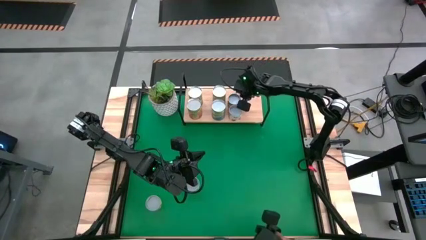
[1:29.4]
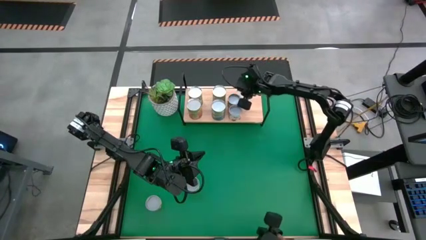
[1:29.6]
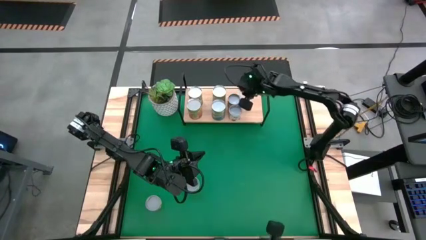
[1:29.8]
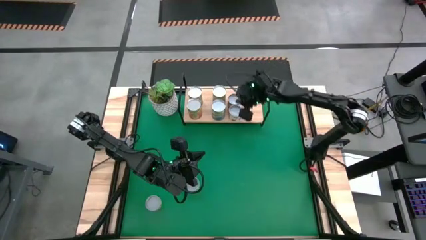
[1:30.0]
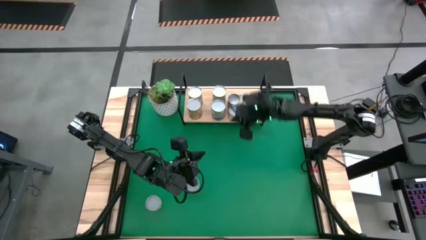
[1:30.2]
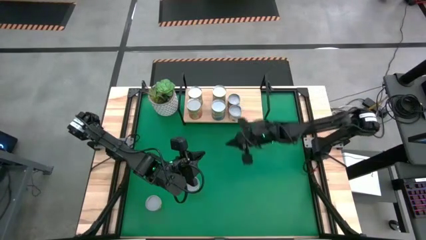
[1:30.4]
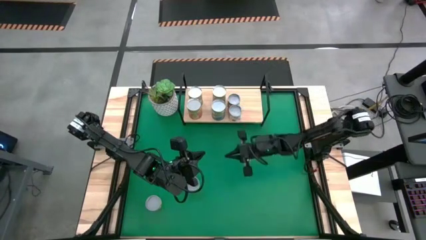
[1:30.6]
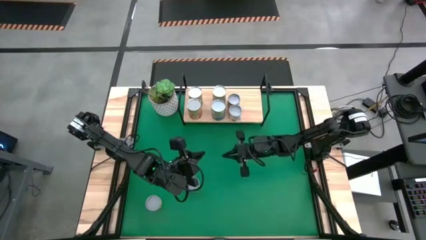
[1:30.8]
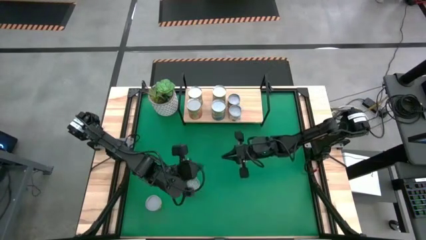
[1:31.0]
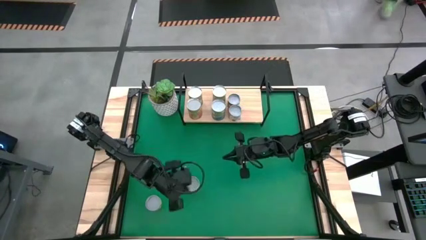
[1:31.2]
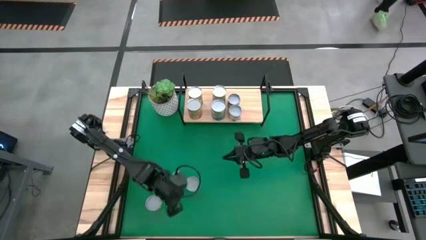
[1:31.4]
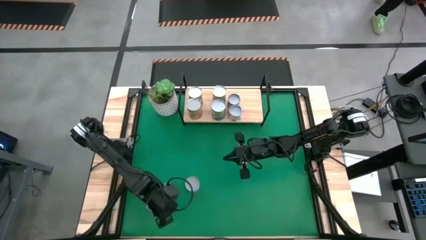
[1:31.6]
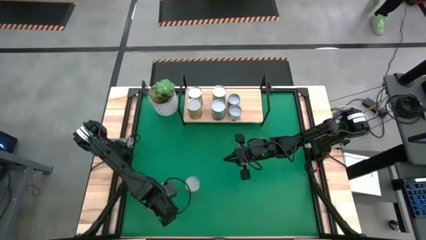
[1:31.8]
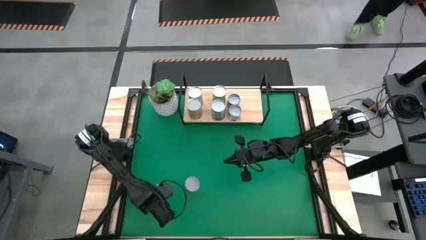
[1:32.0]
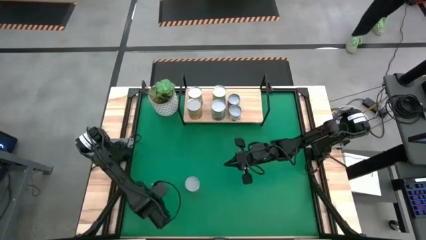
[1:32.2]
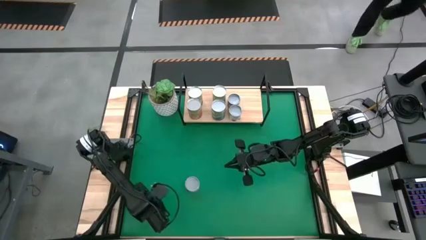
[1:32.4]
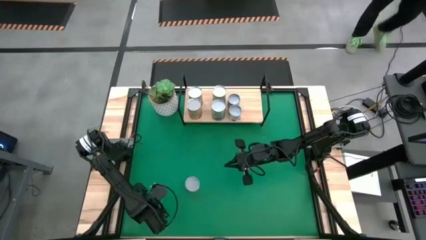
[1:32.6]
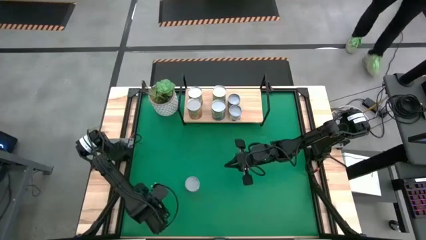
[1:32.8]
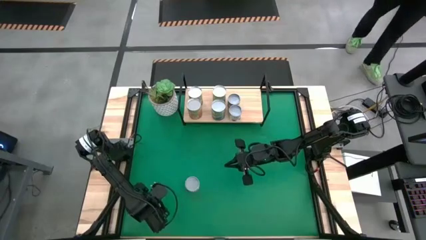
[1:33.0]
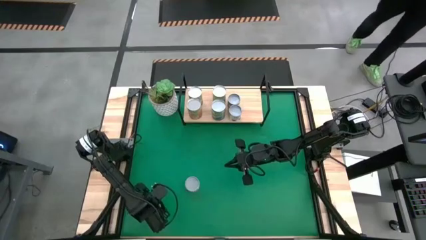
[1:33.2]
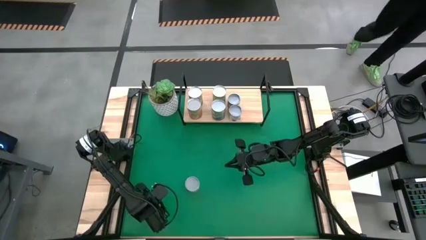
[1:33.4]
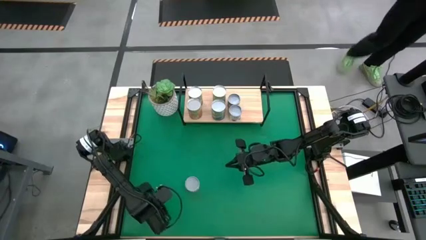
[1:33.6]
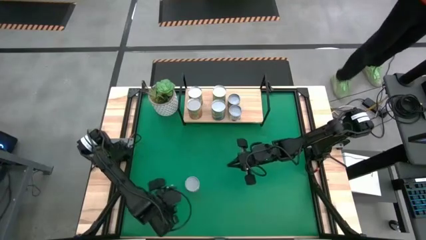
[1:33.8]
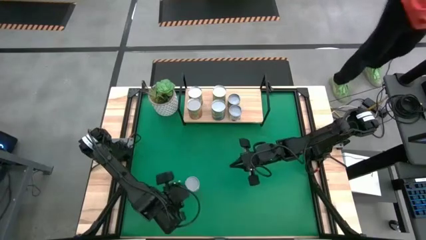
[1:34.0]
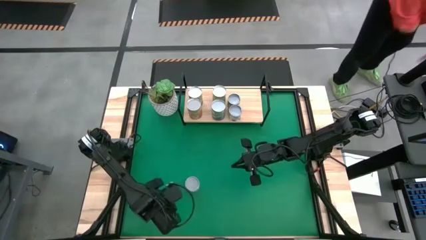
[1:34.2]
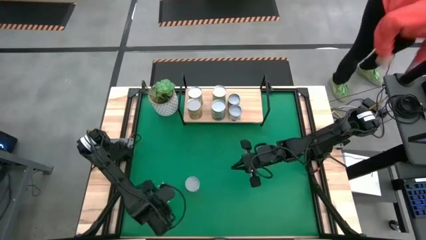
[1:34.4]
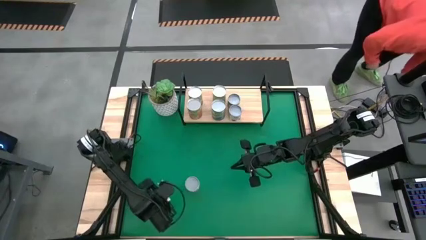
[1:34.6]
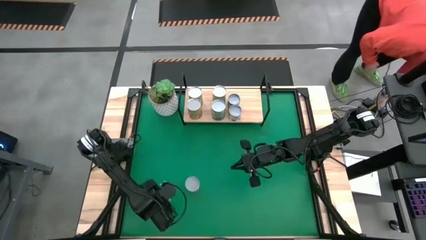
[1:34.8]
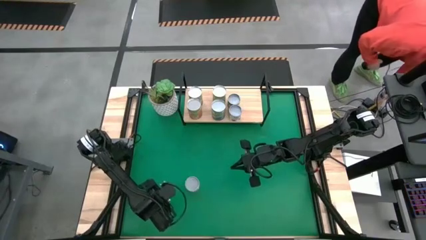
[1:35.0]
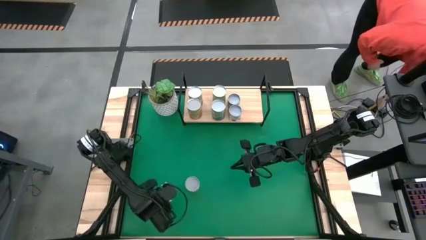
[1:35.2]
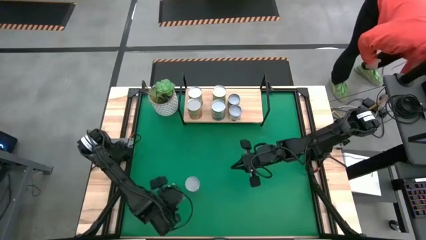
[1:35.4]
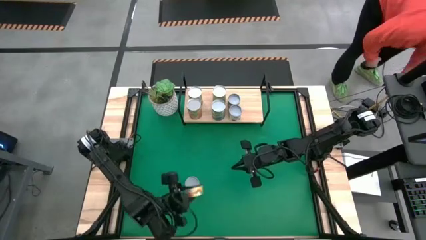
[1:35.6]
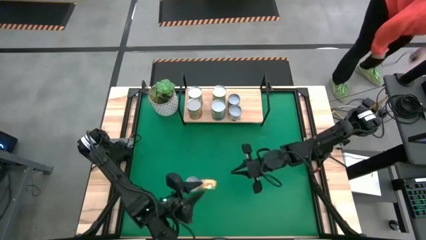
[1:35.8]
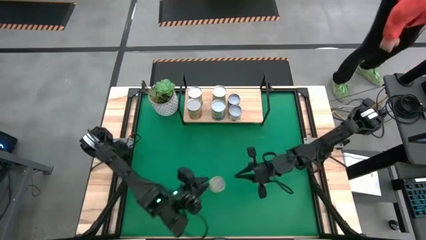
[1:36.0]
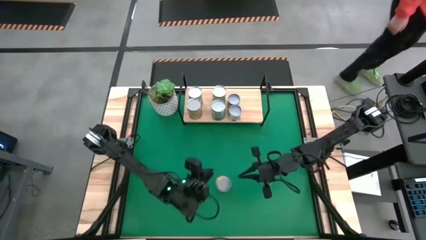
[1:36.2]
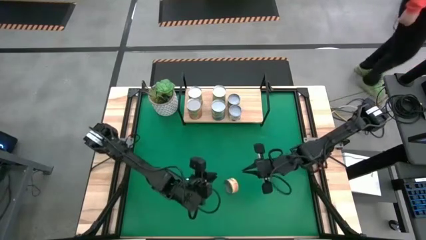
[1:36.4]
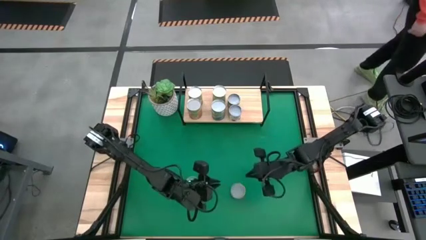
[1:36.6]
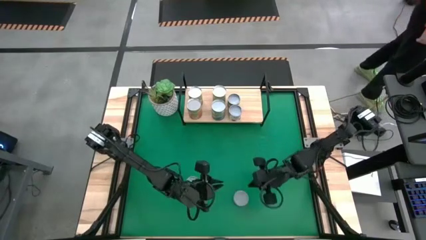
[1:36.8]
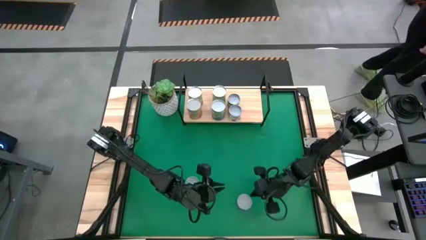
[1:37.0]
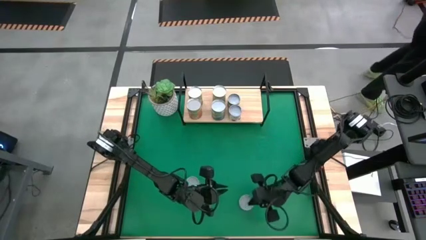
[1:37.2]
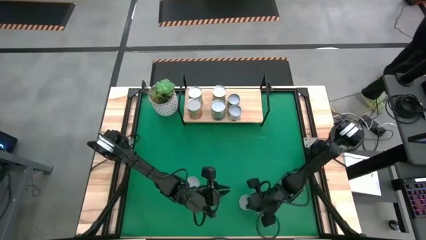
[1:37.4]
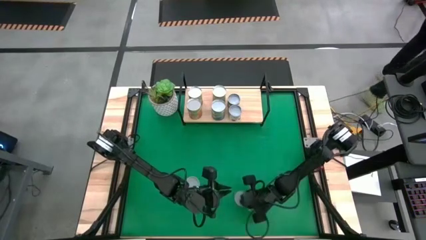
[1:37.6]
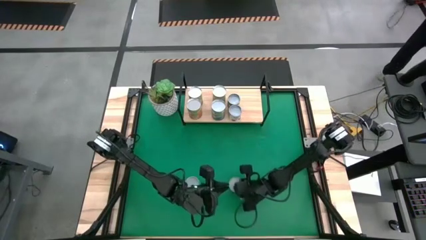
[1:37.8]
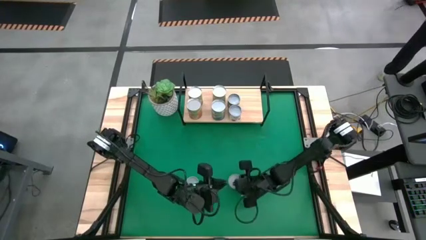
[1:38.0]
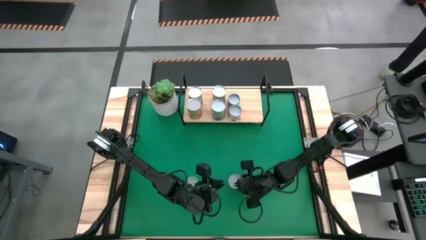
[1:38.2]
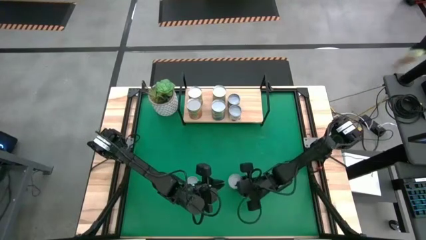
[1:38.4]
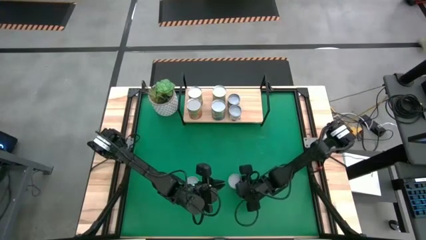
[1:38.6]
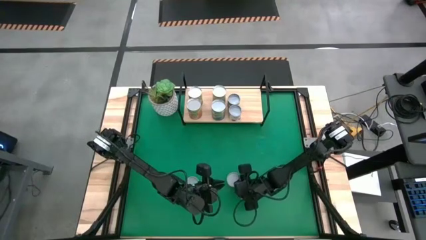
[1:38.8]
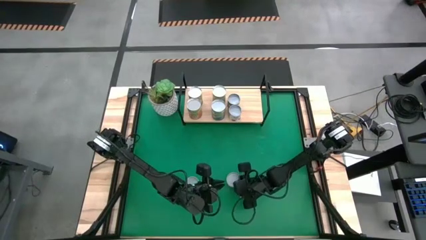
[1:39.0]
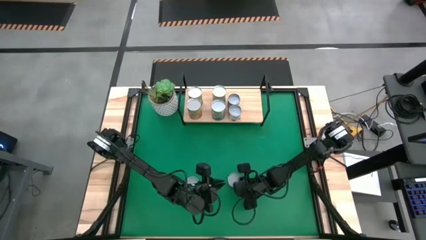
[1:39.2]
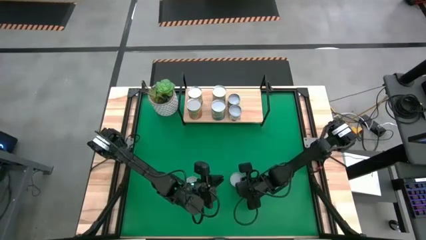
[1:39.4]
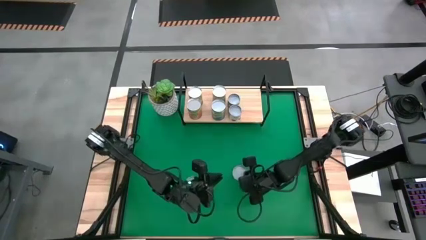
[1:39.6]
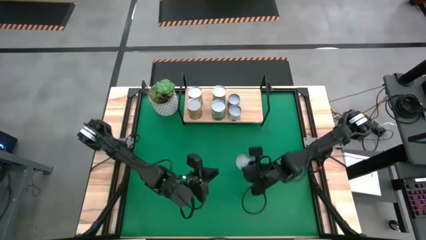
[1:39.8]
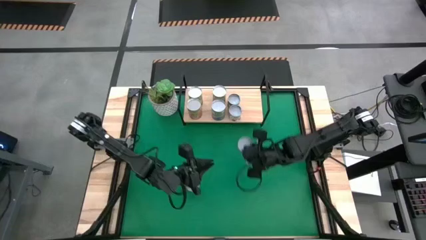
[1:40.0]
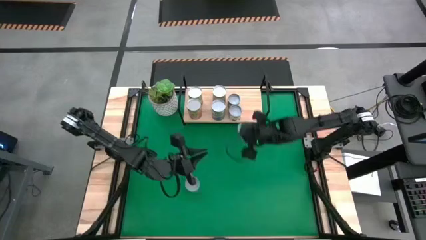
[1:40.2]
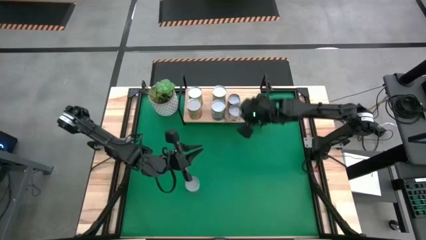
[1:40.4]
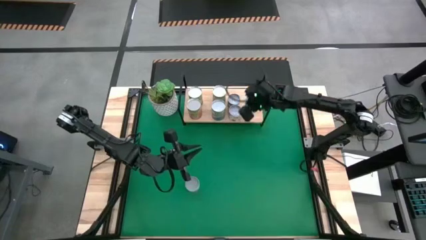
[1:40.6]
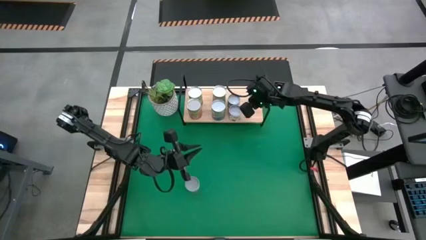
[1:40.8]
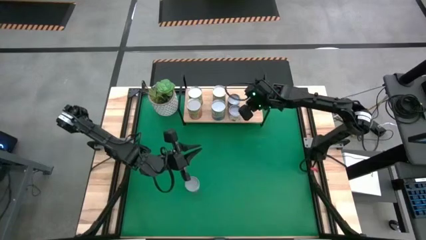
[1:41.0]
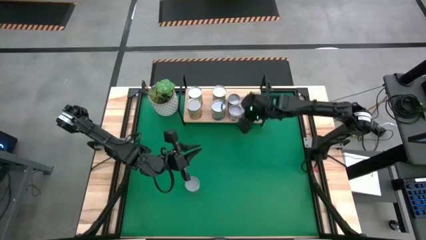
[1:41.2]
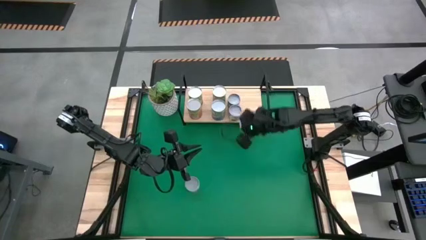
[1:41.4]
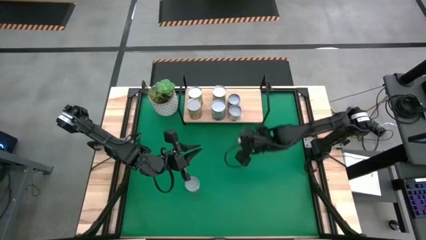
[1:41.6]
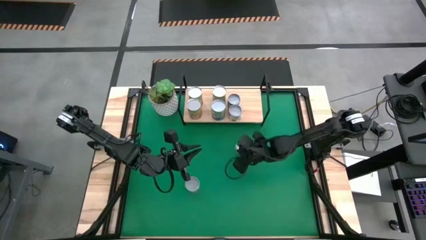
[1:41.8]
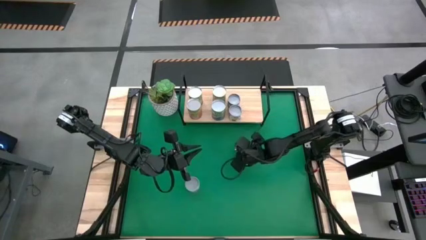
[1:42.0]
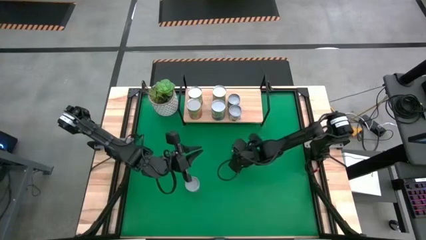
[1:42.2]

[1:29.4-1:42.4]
Task: Pick and place cans onto a shelf
Put the canned mushrooms on the shelf

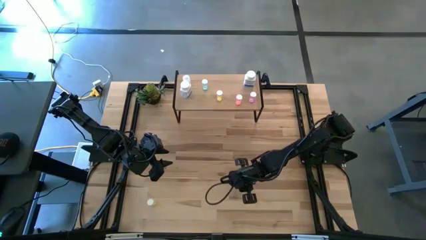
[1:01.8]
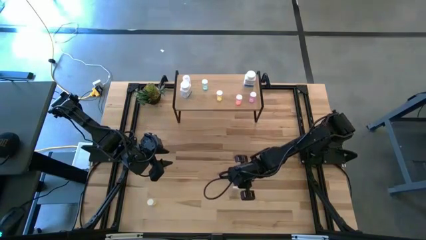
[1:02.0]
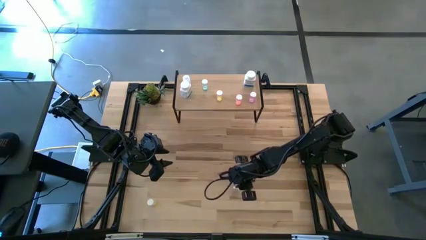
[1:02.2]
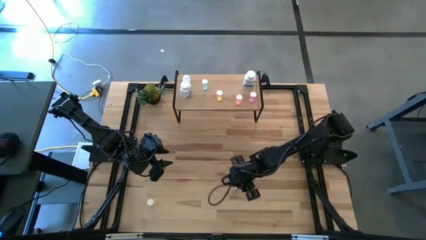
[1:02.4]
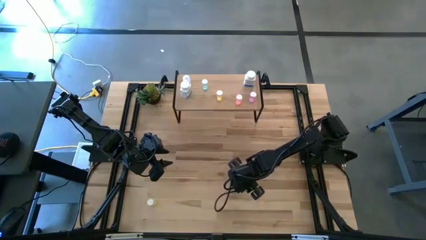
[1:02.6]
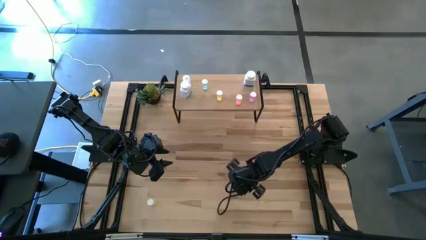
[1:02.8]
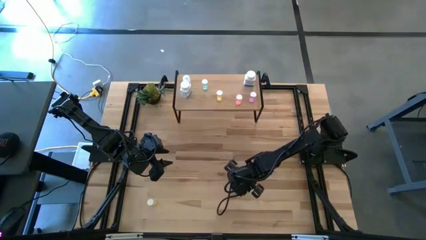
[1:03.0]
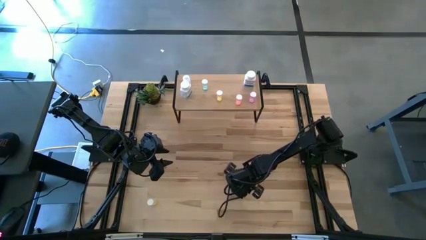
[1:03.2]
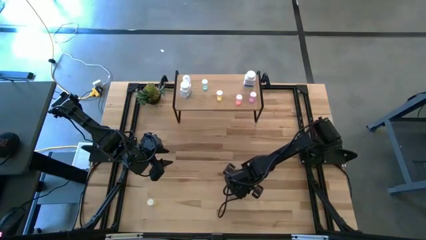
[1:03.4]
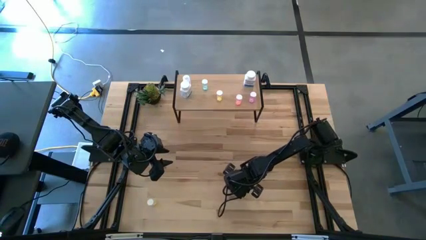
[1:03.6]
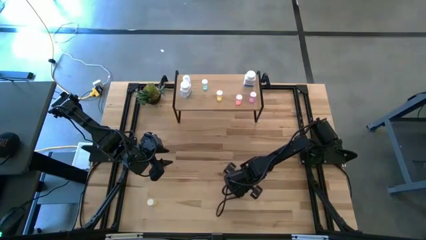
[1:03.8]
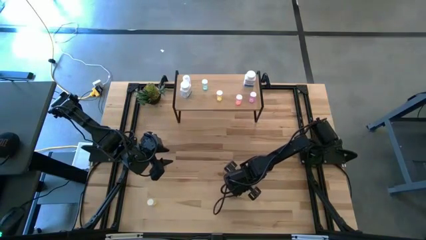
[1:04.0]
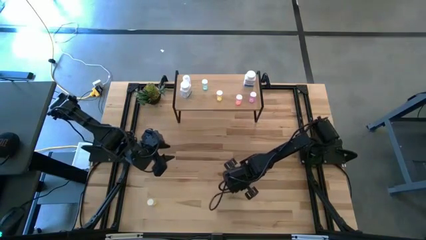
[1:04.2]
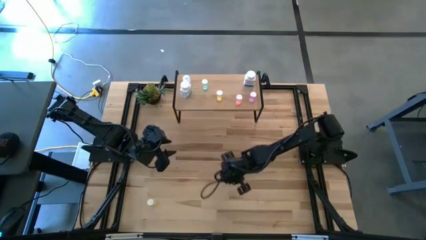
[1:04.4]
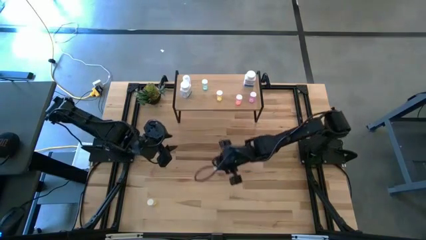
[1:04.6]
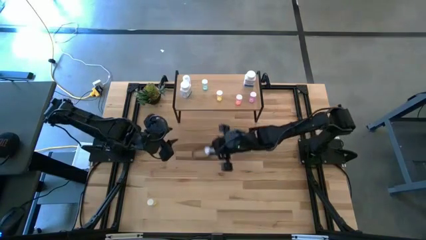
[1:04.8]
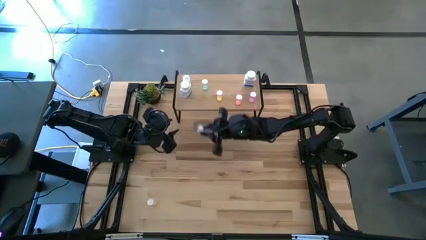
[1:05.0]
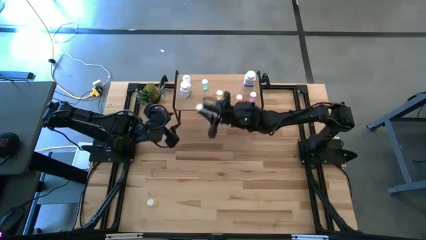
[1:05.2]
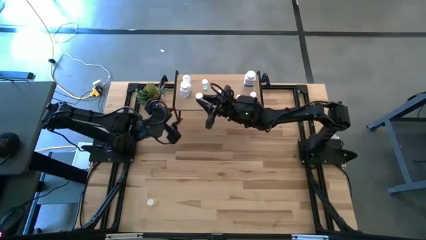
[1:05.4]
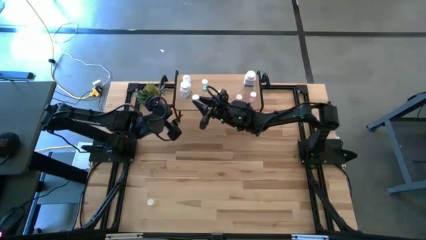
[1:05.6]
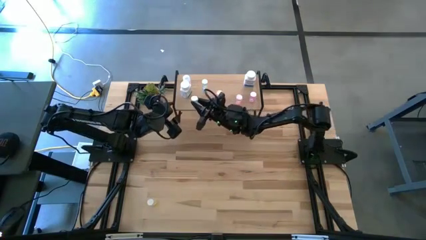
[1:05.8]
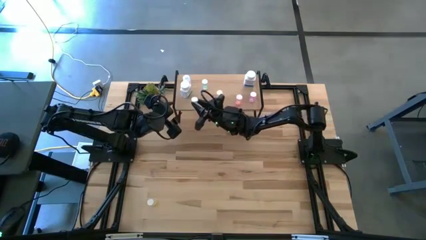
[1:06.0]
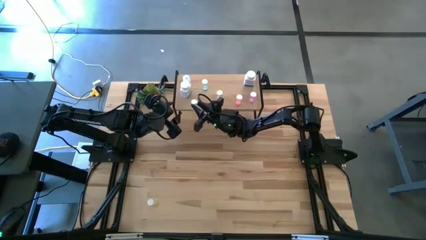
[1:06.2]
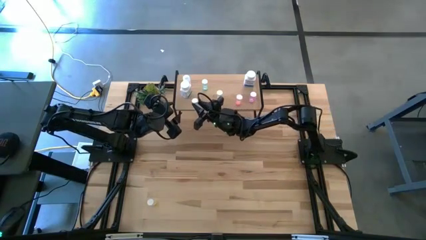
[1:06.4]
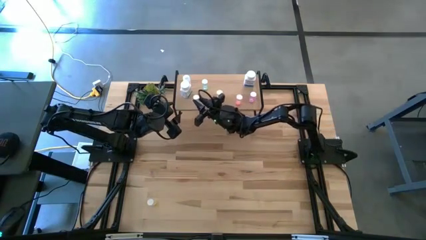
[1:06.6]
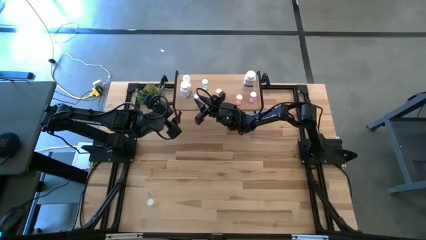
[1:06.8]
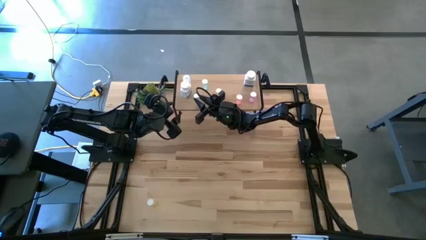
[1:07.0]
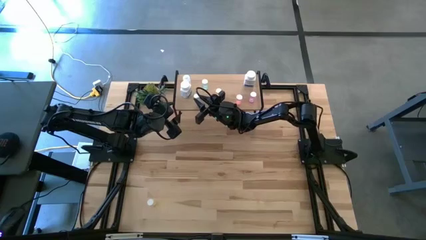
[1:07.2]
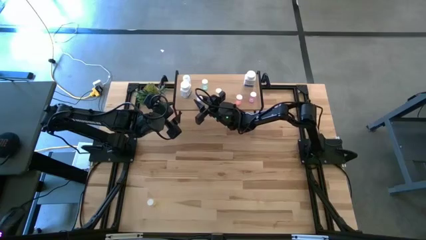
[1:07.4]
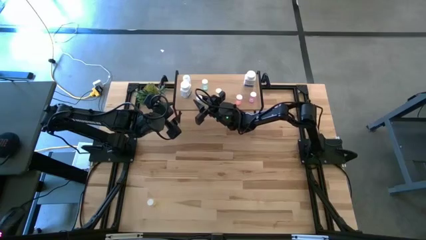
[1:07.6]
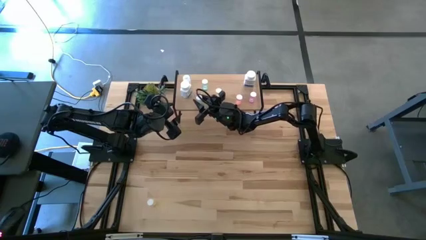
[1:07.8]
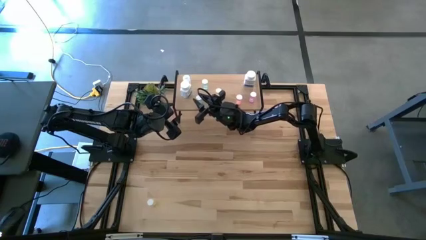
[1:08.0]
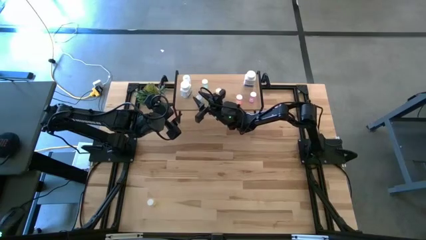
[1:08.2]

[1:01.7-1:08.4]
Task: Pick and place medicine bottles onto shelf by color
Put the blue pill bottle on the shelf
